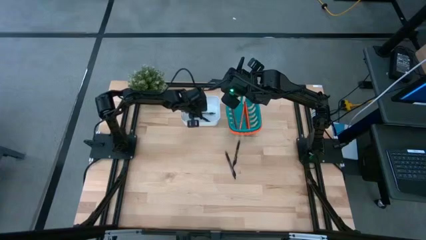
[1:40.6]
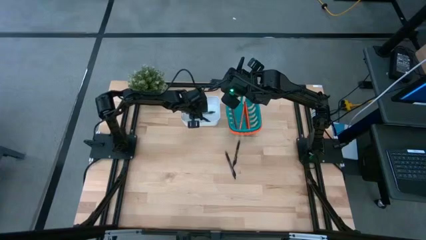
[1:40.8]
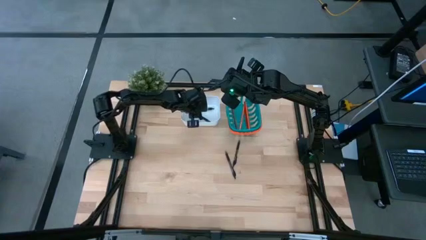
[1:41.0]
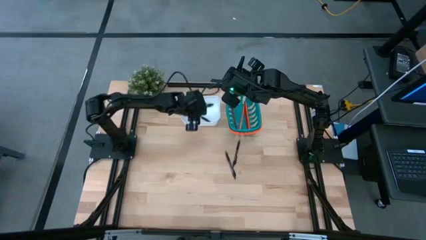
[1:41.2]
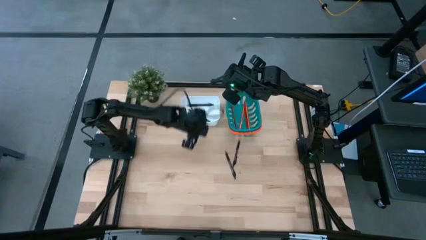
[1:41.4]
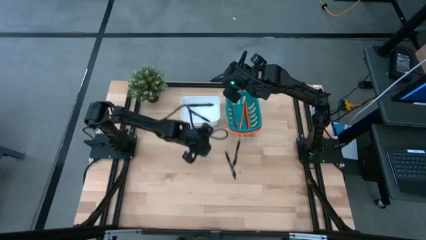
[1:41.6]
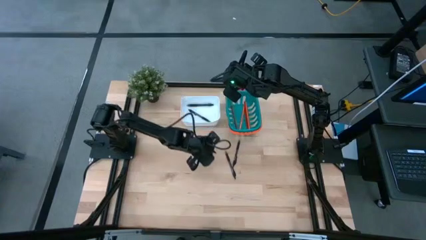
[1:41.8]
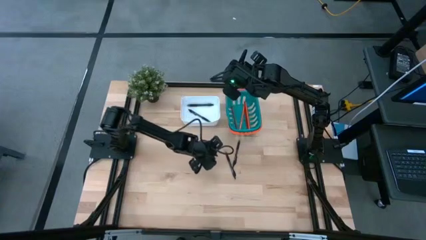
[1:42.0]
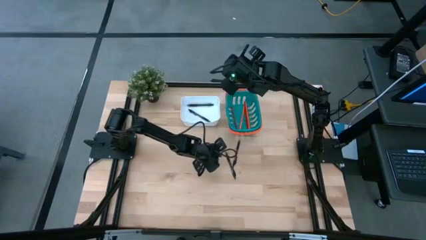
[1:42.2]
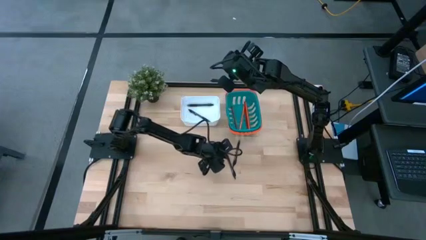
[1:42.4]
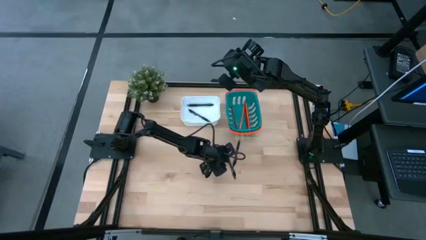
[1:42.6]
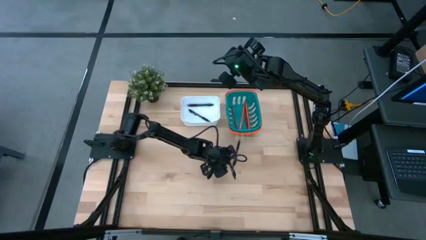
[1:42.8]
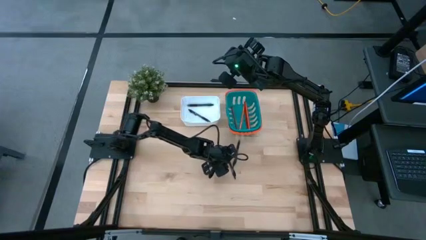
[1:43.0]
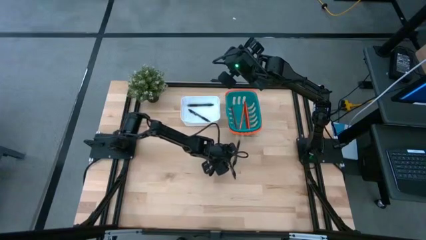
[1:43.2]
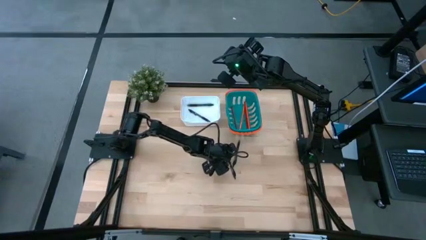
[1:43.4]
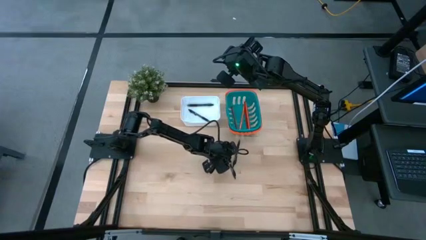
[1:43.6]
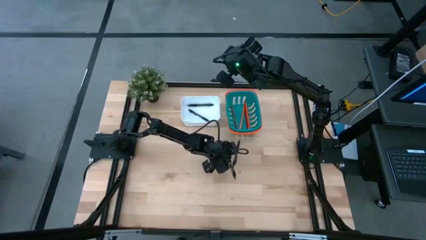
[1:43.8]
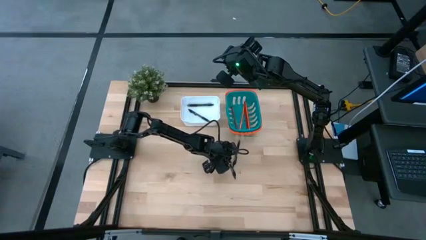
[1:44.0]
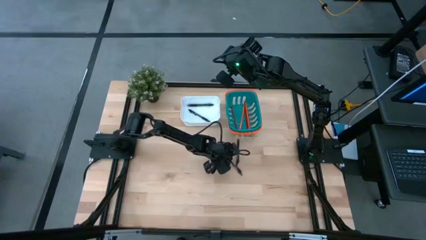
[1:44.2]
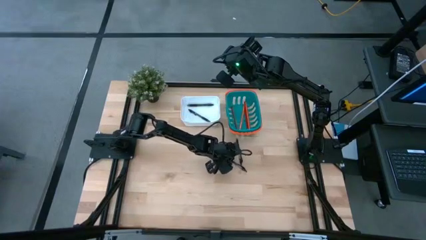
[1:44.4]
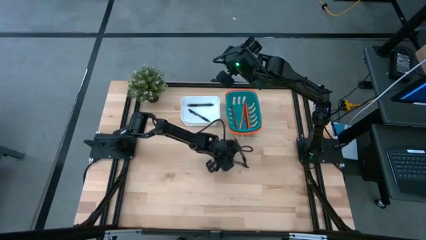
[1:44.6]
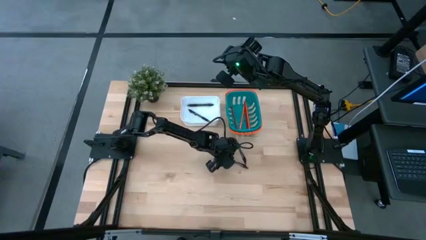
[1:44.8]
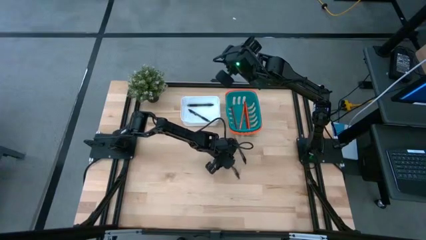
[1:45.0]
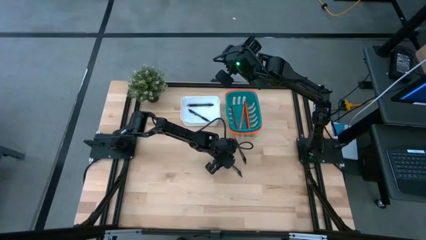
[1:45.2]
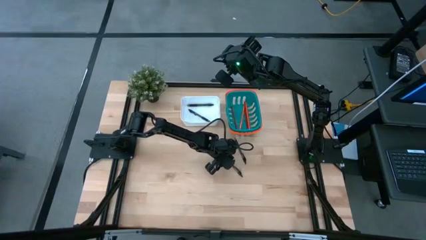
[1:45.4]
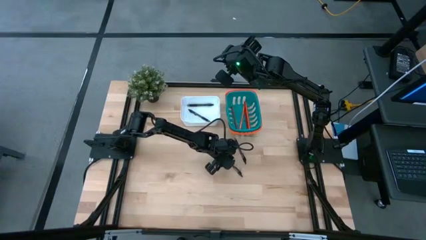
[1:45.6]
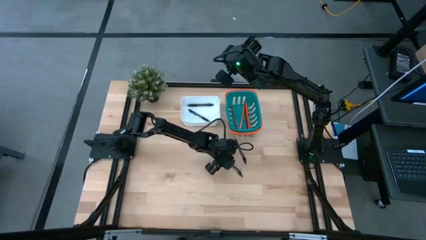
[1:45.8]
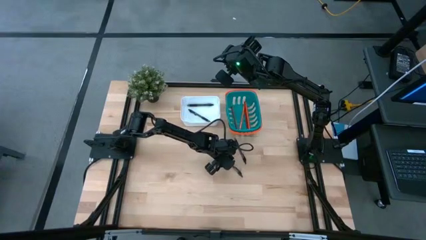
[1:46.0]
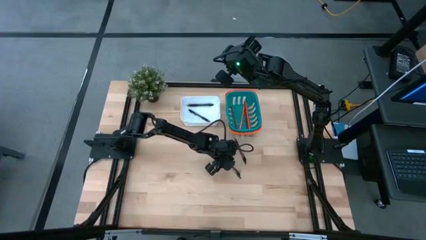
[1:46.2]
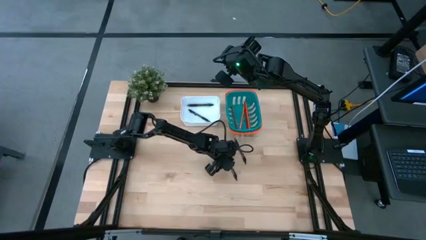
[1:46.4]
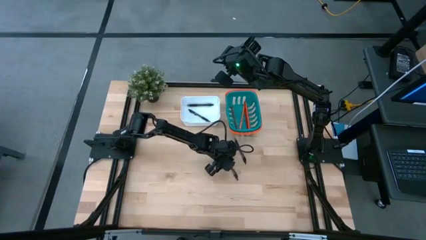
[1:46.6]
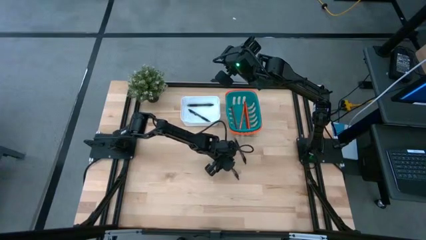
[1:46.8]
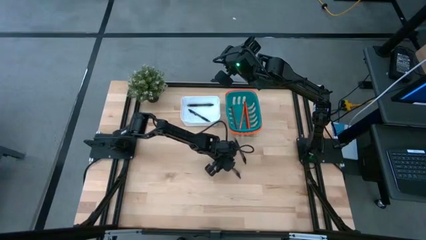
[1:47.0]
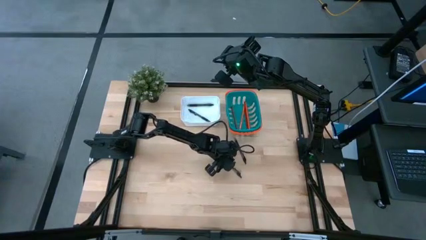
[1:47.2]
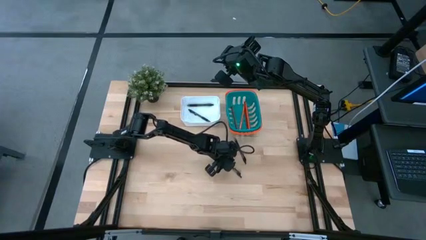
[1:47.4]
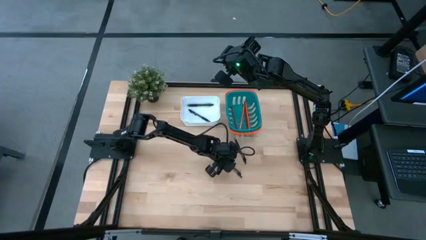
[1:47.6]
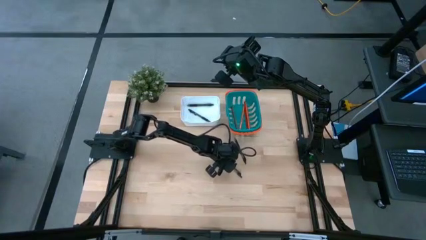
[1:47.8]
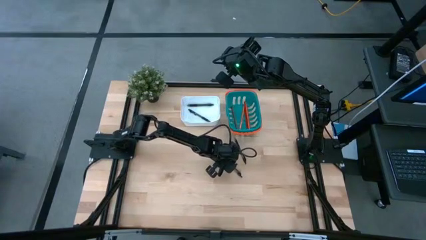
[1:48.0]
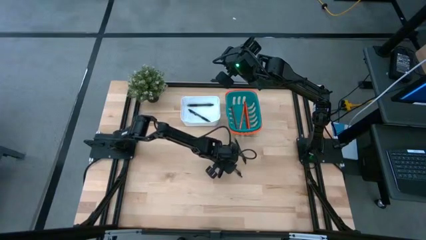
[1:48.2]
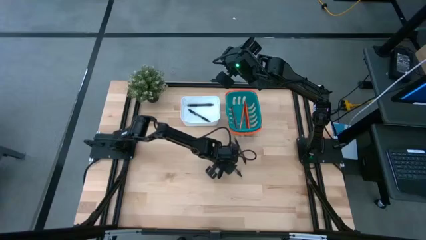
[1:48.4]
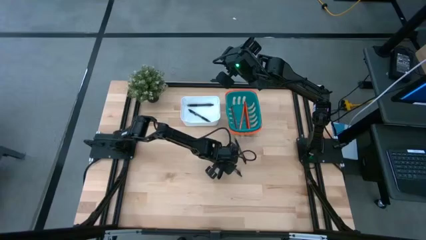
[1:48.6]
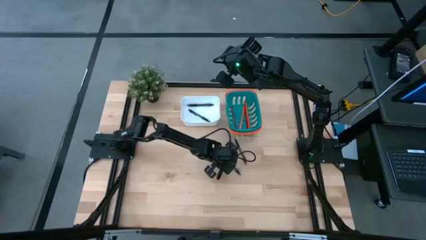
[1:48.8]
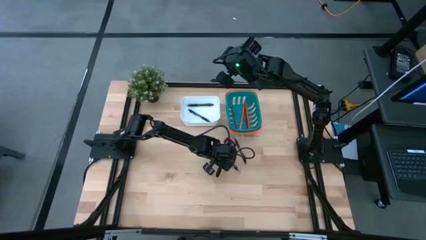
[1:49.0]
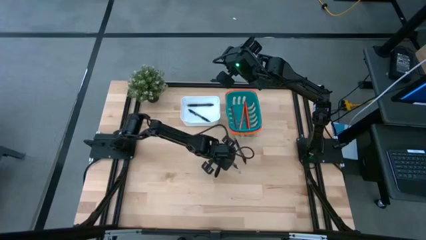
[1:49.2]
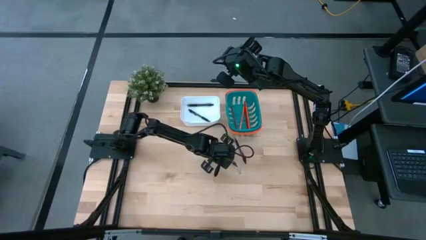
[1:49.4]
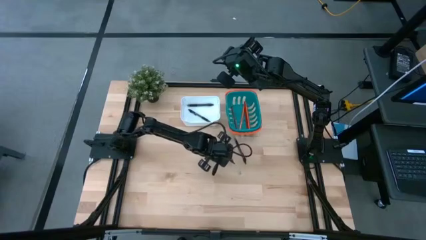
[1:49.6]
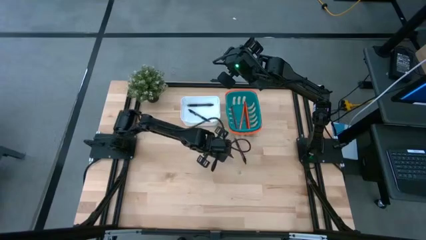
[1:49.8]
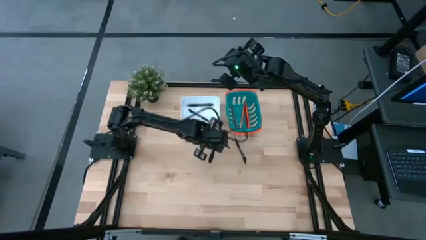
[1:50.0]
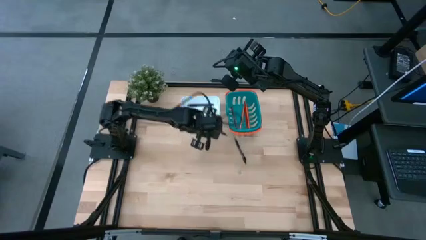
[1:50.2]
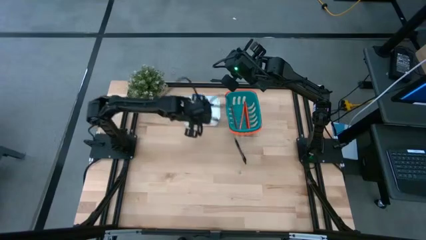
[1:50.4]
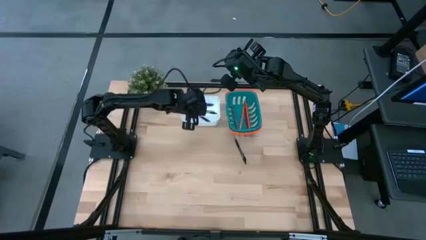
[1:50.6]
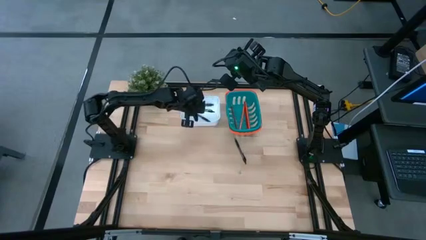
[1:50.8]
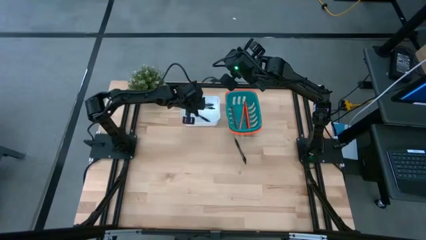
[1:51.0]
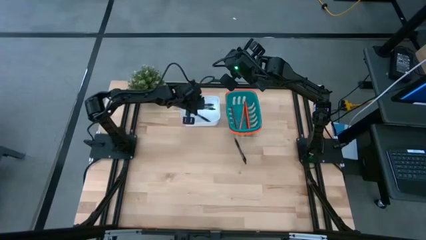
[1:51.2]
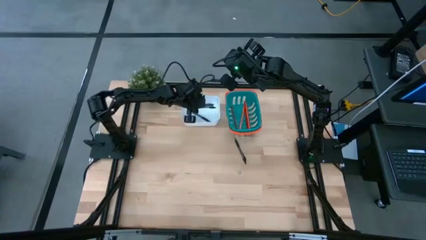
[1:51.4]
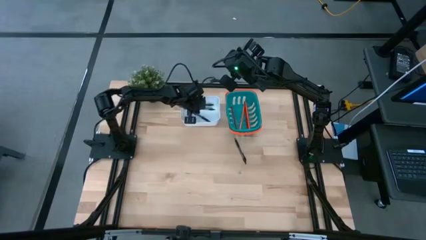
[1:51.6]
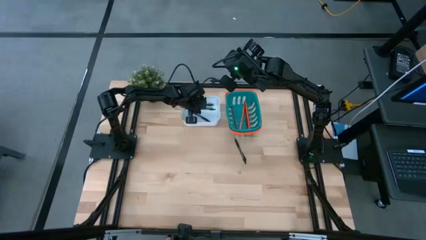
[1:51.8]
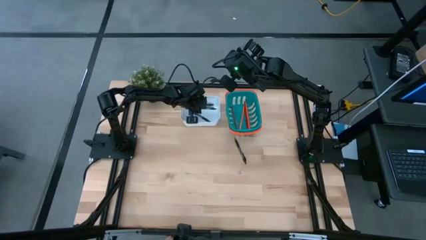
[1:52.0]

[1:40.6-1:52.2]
Task: Sort pens & pencils
Put the left black ballpen into the white bin

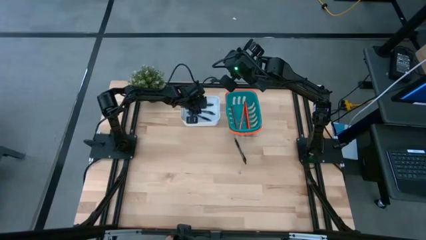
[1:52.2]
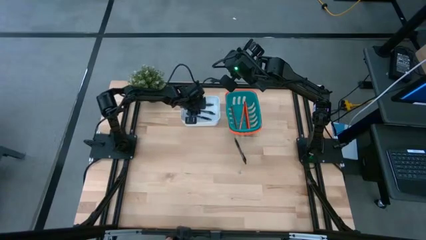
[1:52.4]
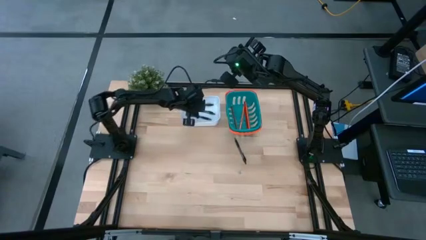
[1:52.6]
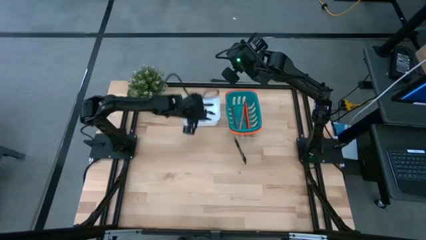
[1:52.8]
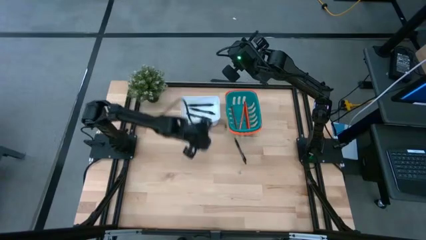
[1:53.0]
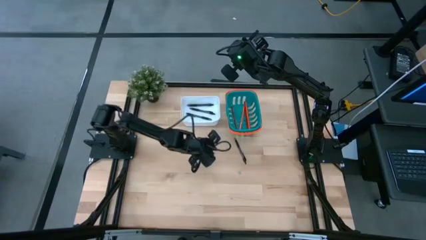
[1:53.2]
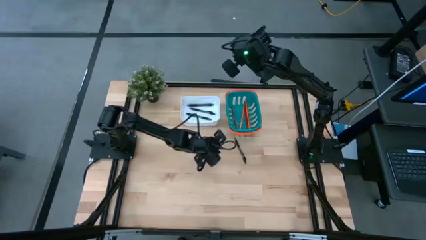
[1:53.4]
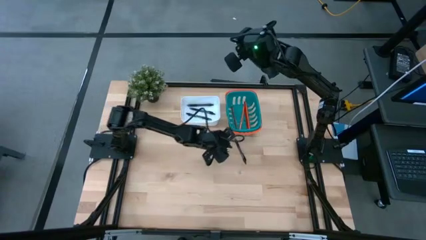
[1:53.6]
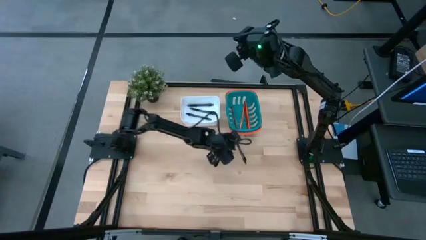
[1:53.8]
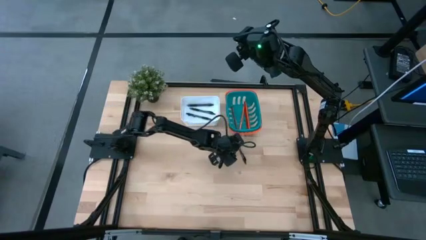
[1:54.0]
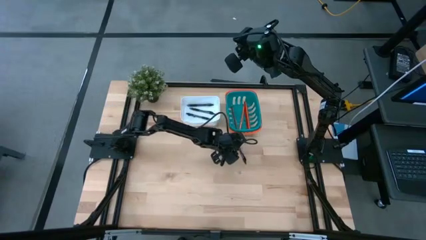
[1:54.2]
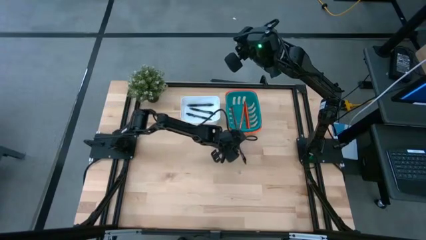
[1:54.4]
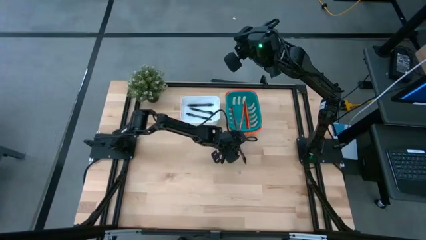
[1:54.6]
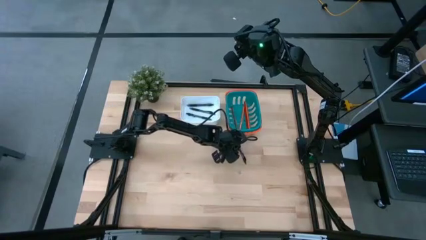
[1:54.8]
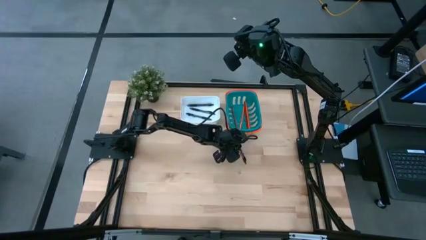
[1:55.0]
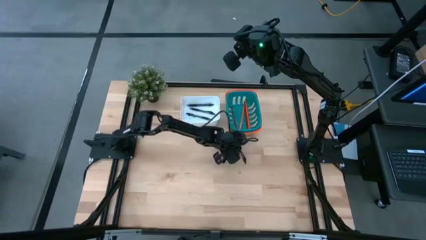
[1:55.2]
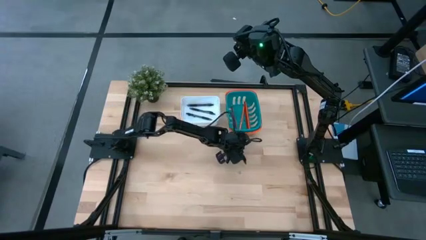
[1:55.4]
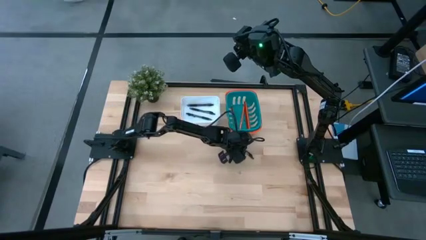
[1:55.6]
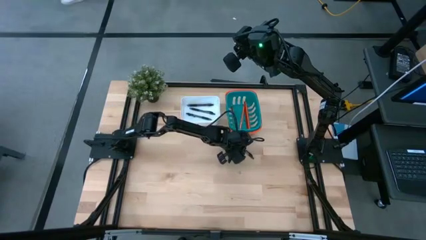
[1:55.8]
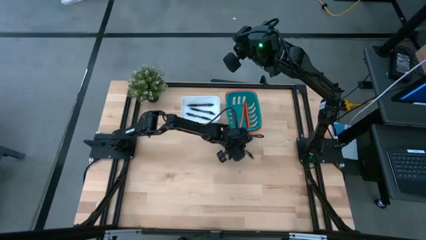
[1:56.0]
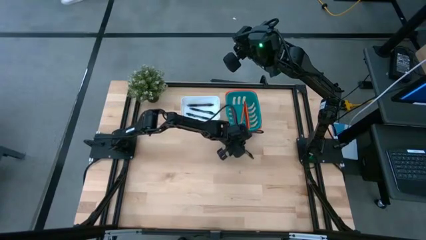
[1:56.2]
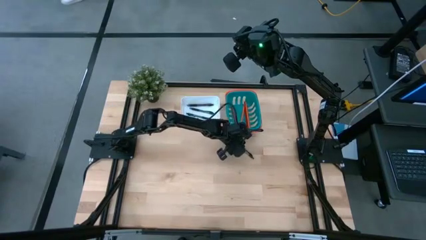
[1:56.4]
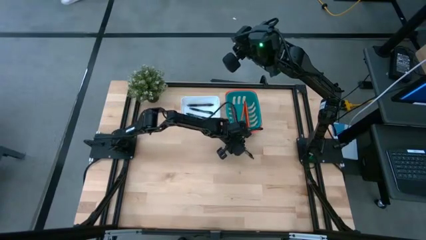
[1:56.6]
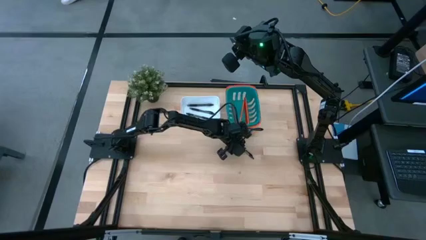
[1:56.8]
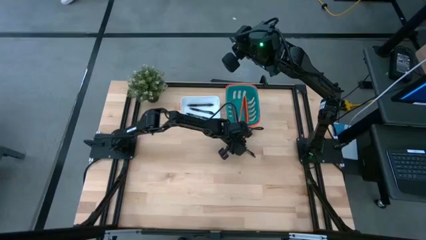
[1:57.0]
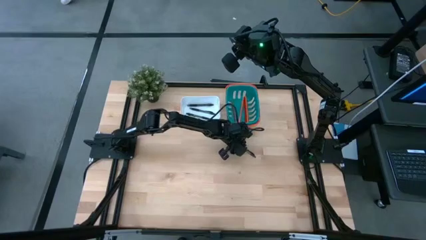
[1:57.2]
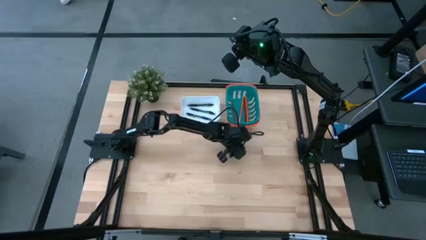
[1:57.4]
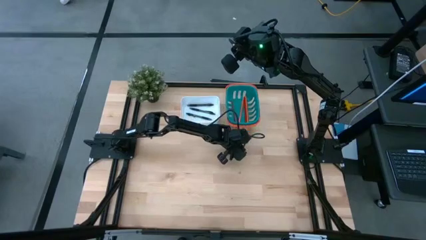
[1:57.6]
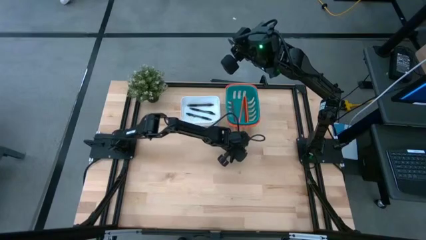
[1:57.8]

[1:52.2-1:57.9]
Put the black ballpen into the white bin
